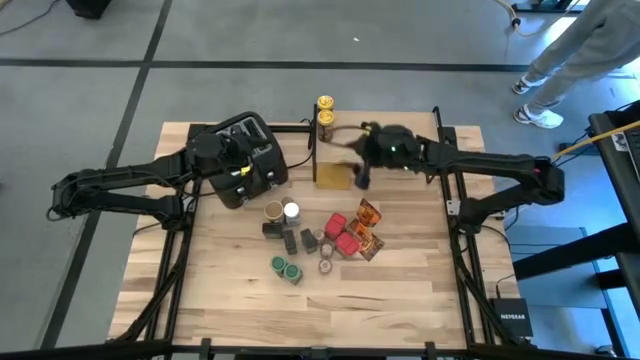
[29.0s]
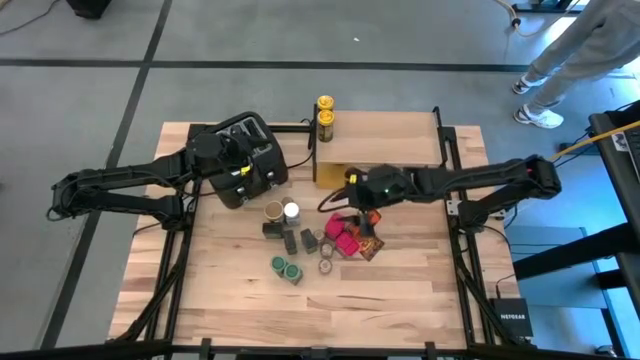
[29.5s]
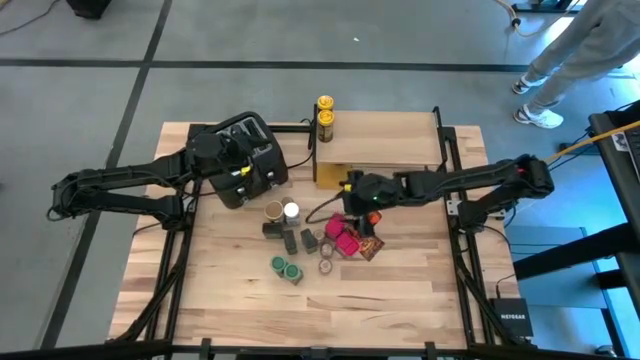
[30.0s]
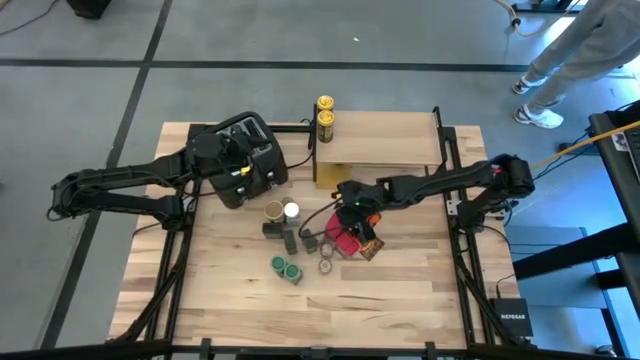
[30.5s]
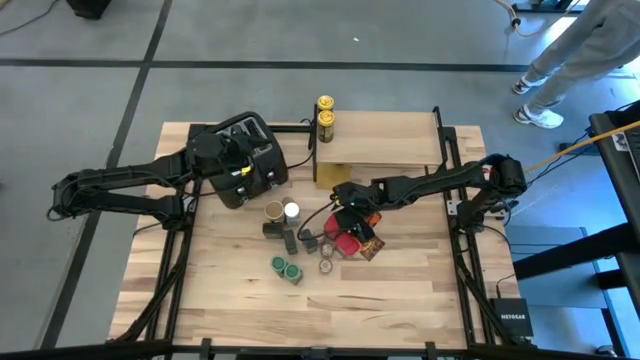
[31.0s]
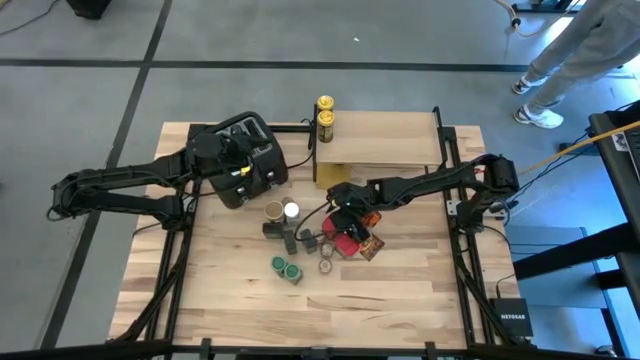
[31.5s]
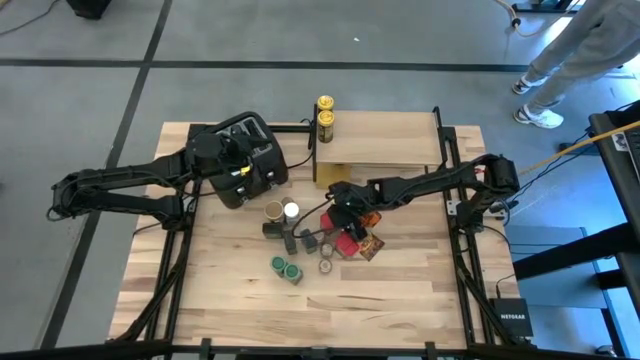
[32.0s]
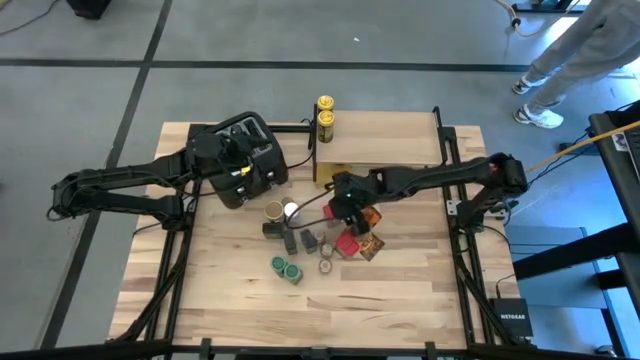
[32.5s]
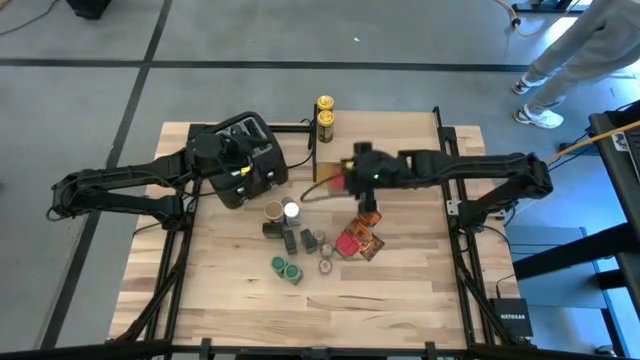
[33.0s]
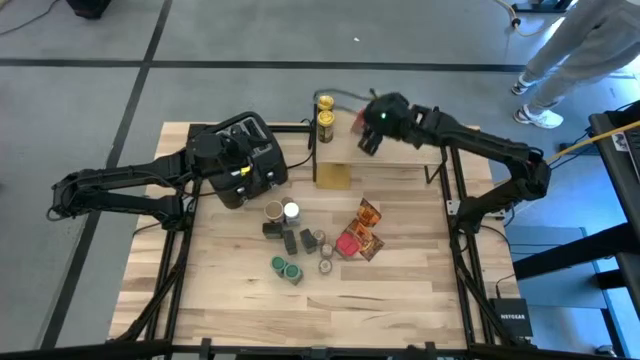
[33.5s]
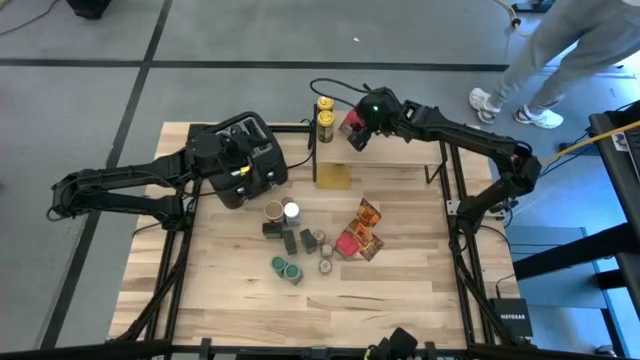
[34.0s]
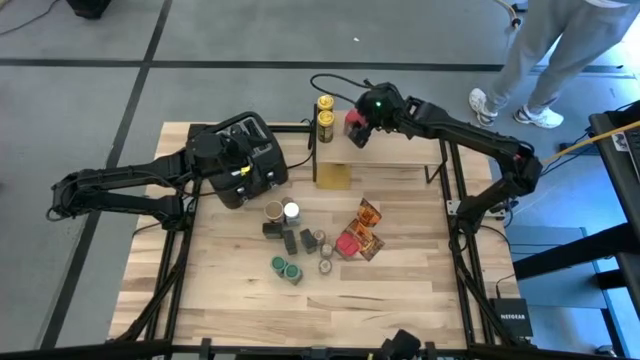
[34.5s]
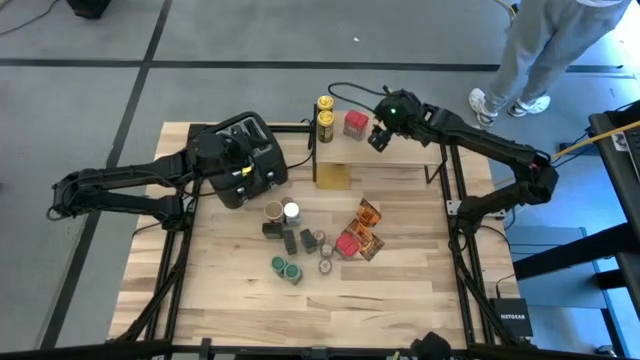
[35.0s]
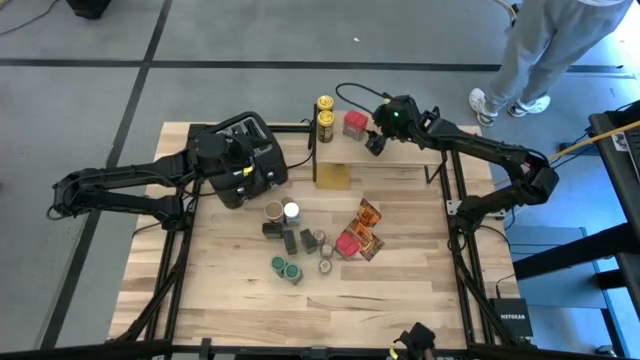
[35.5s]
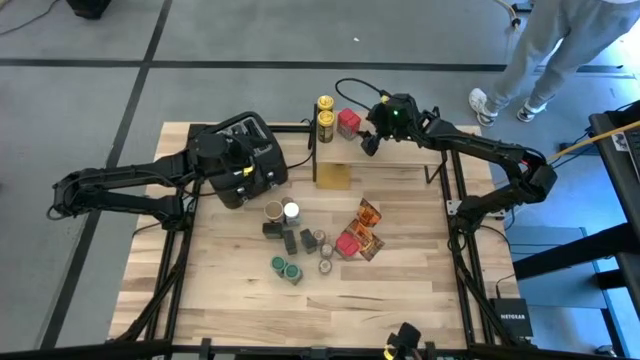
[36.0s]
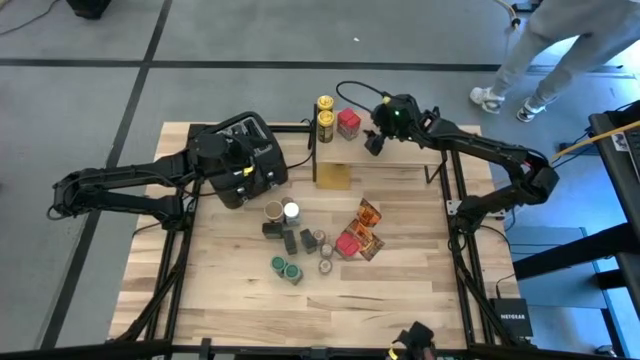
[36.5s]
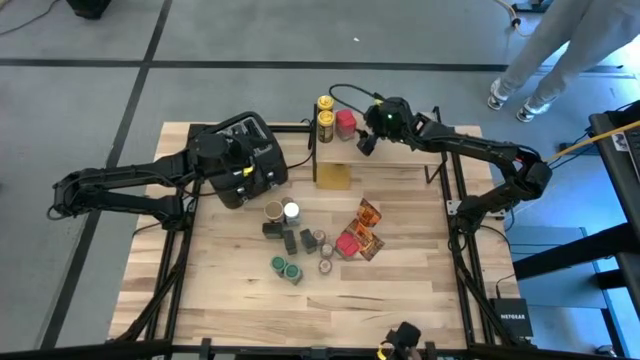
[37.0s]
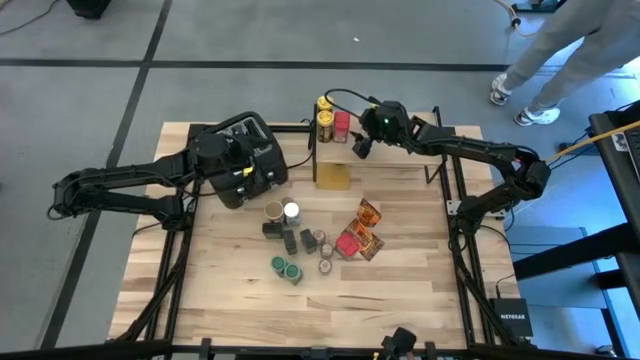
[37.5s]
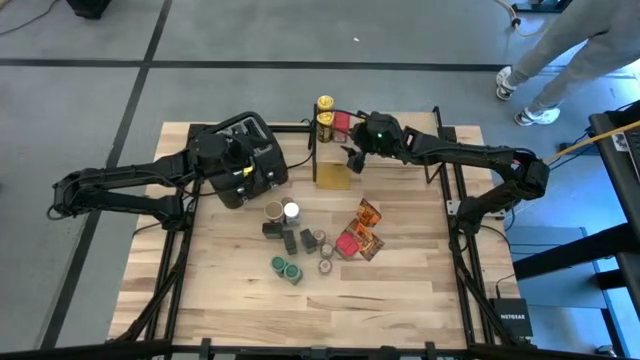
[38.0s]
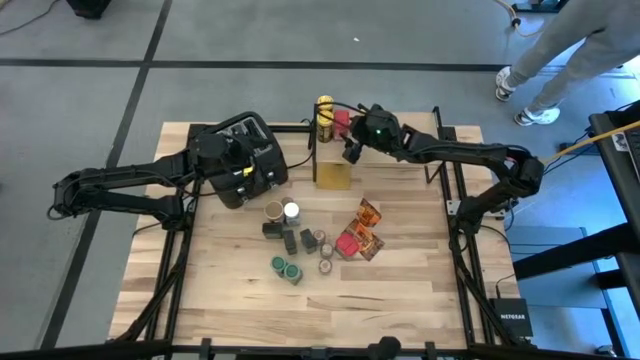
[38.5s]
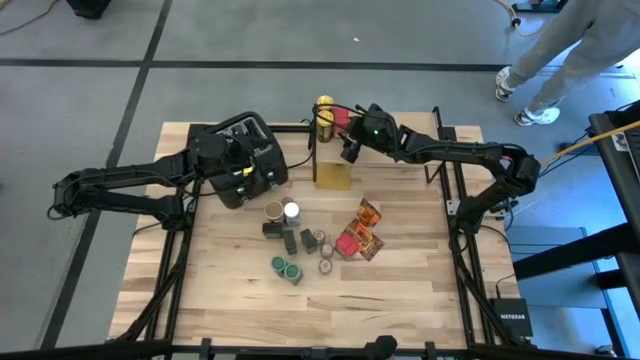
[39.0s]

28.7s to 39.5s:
Task: Shelf spices
Put the red seasoning can on the shelf

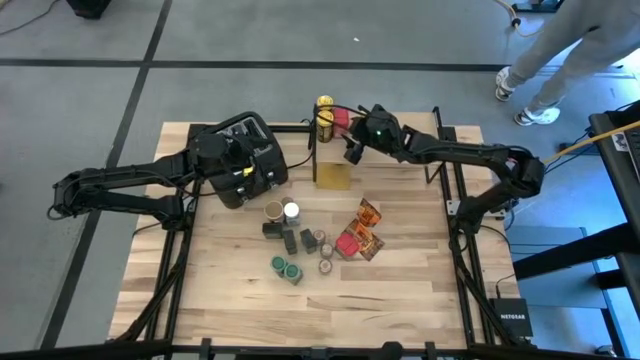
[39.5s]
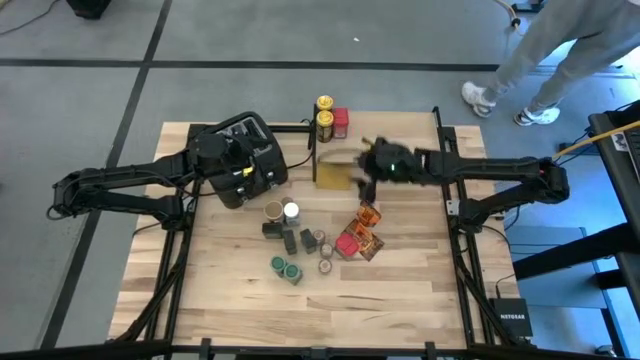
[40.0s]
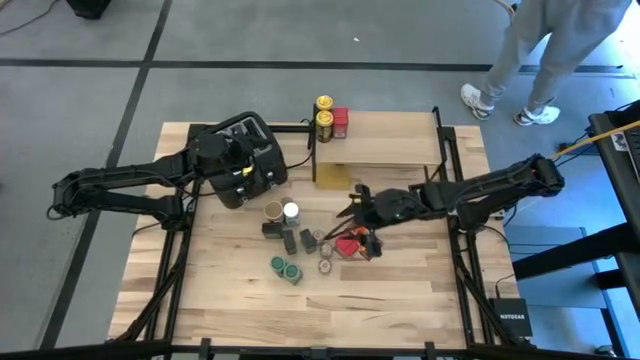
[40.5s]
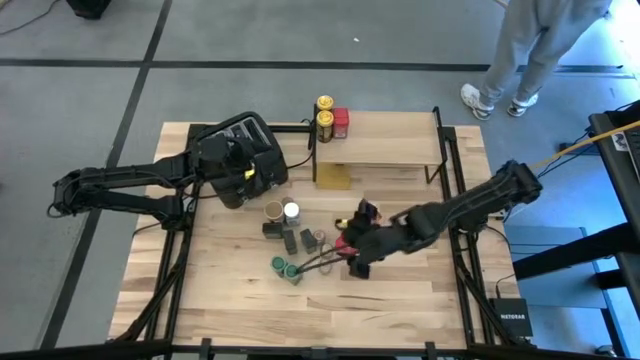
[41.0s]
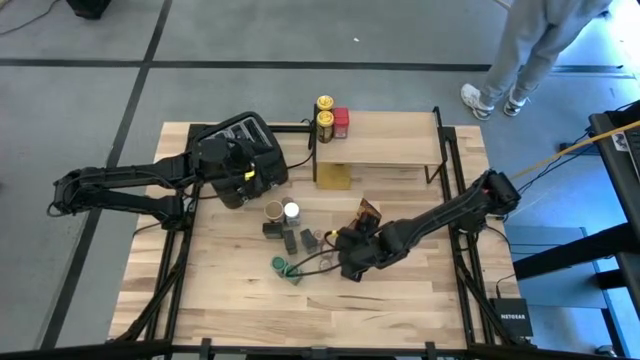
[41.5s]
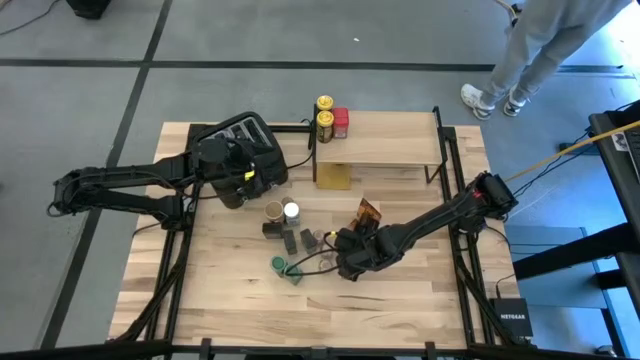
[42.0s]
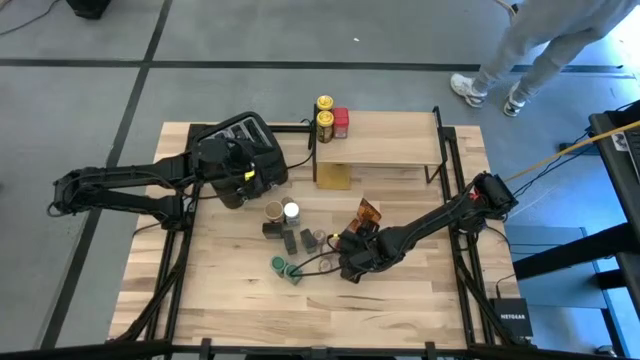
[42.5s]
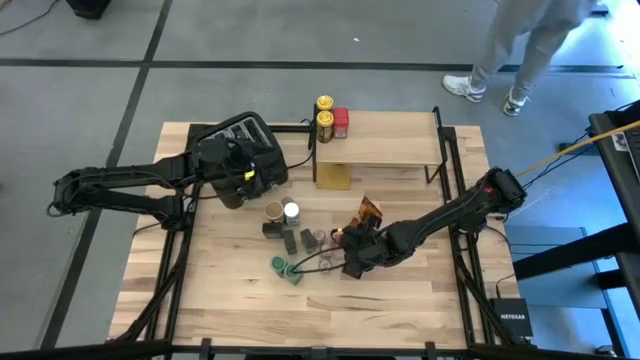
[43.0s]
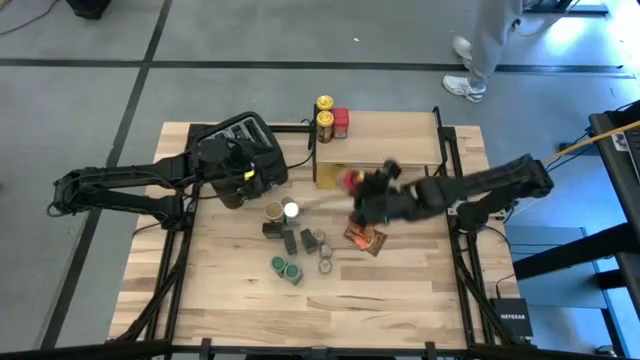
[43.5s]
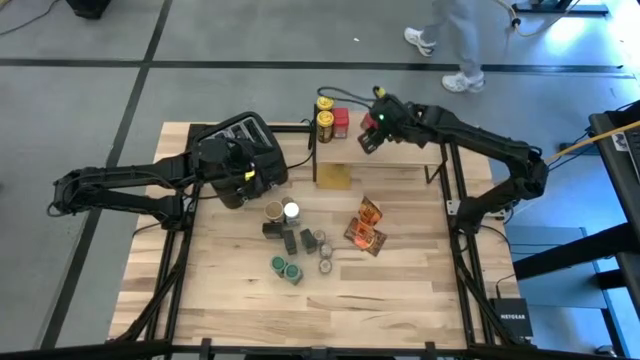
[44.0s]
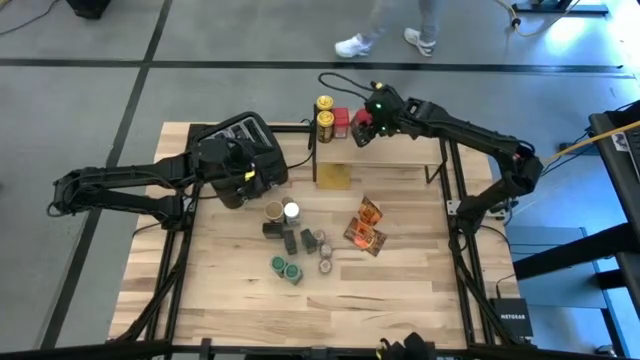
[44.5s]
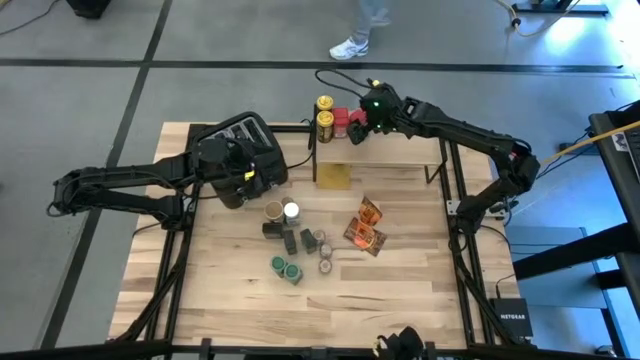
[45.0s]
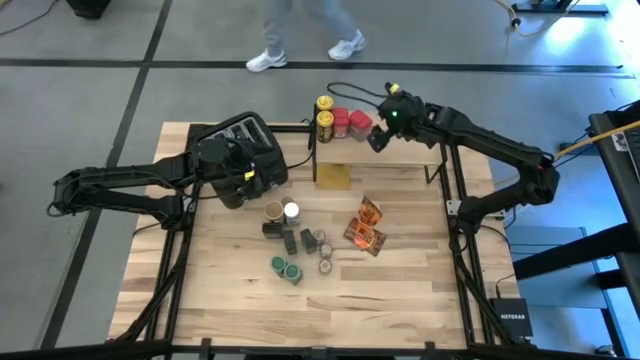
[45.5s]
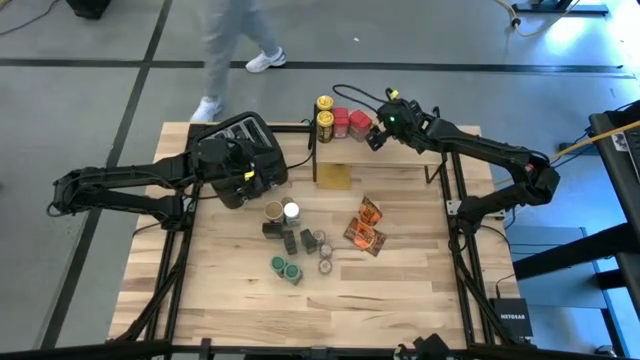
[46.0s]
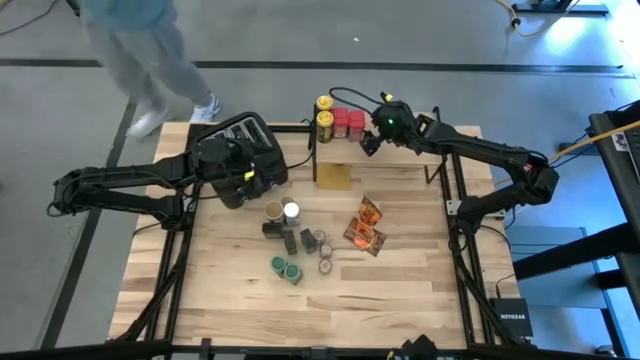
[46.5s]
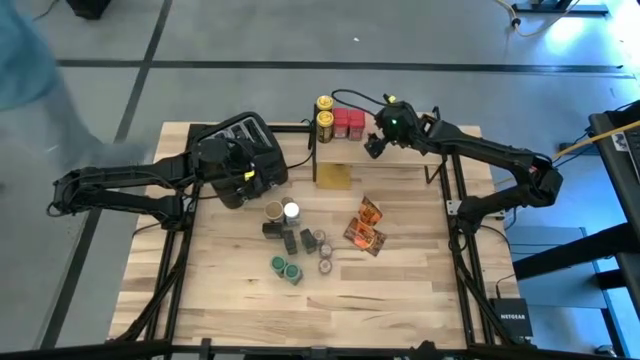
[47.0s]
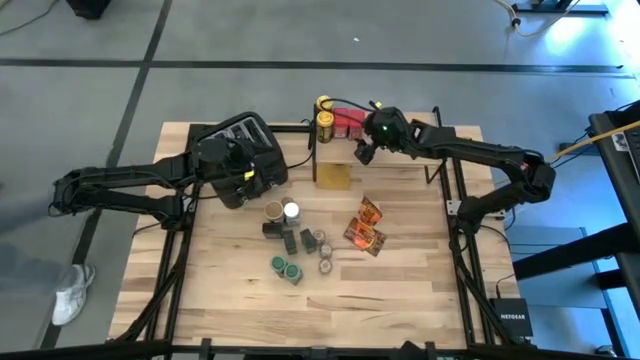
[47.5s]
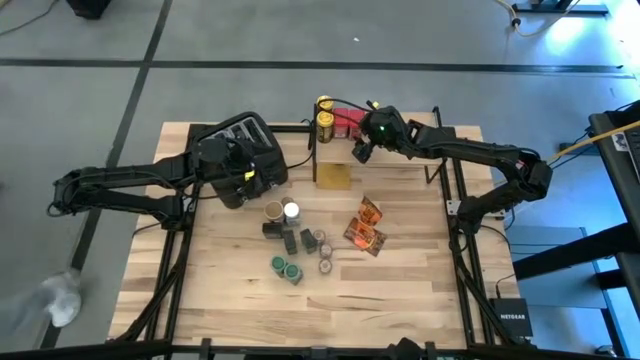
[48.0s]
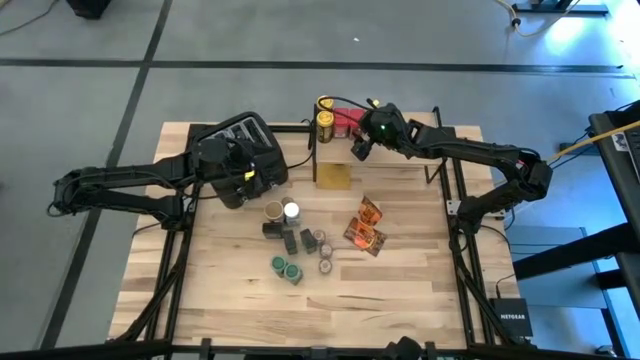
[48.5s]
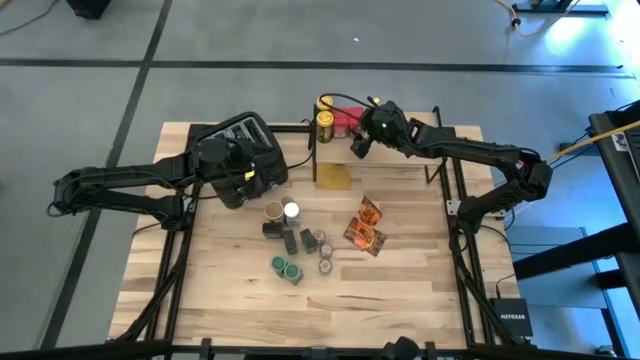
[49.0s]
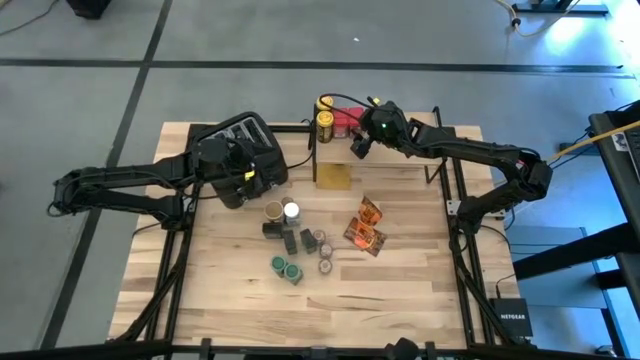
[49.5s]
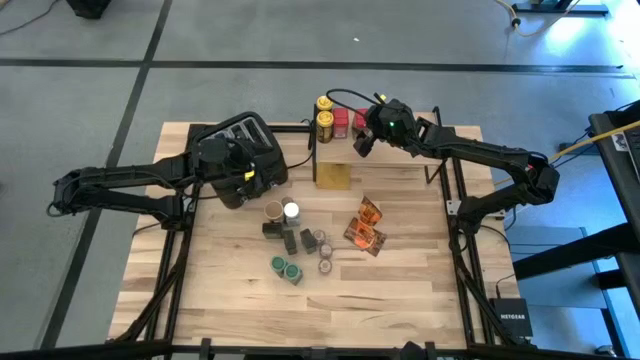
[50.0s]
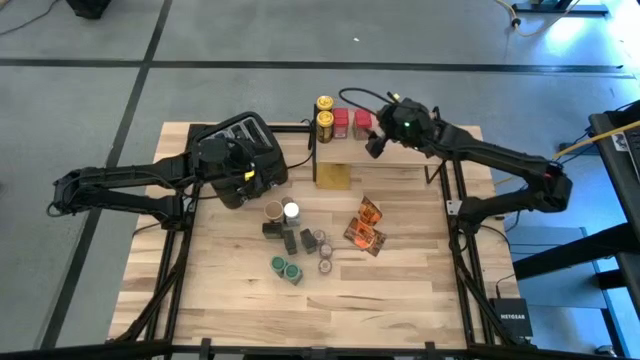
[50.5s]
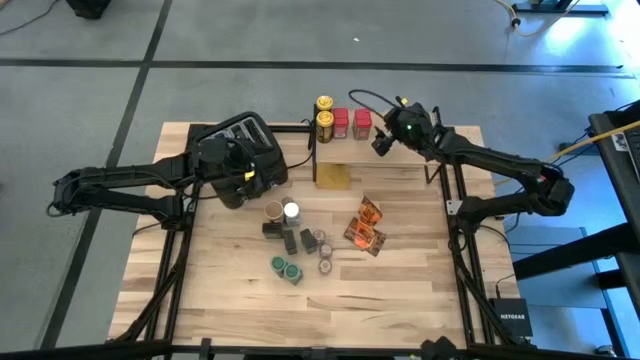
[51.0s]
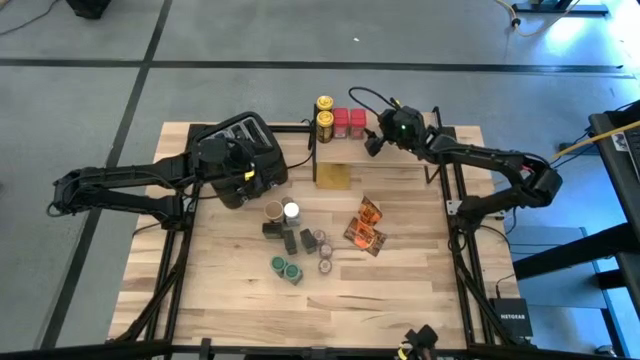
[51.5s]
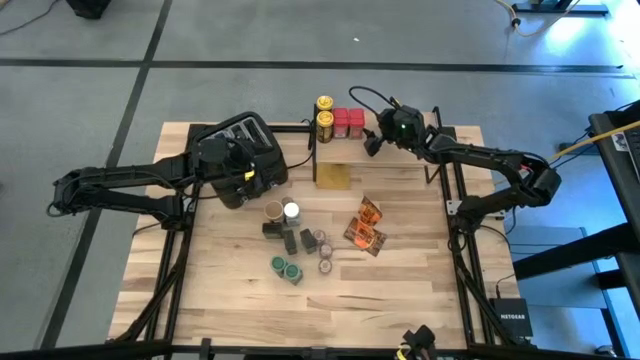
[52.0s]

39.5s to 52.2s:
Put the red seasoning can on the shelf
